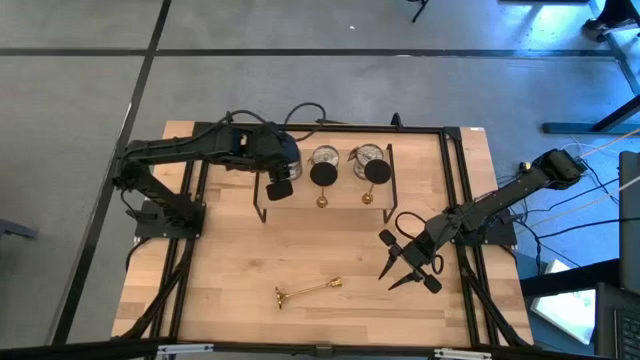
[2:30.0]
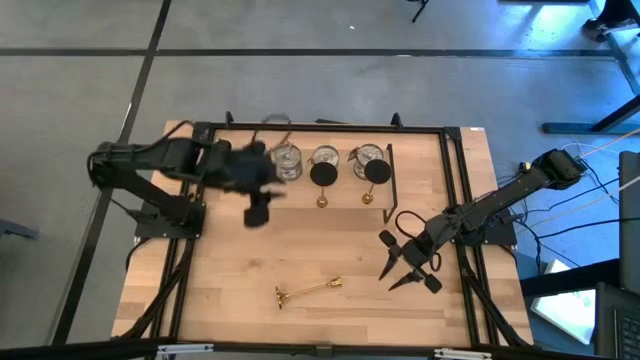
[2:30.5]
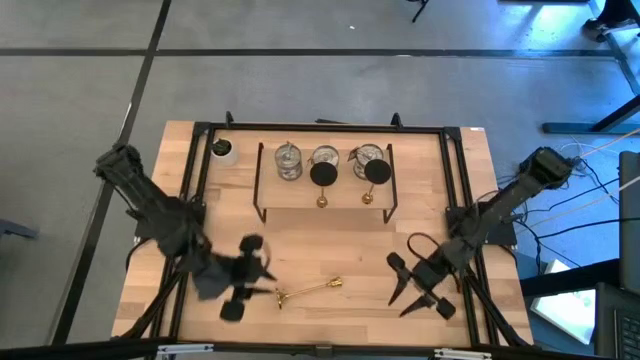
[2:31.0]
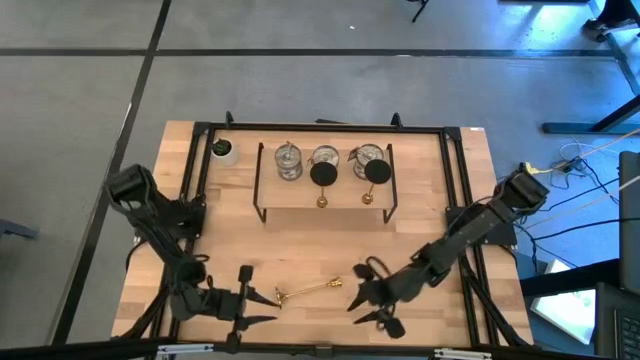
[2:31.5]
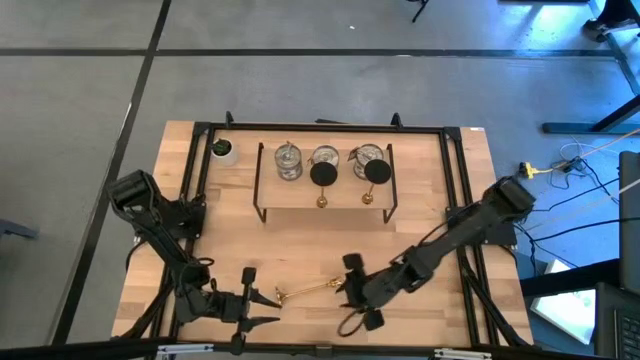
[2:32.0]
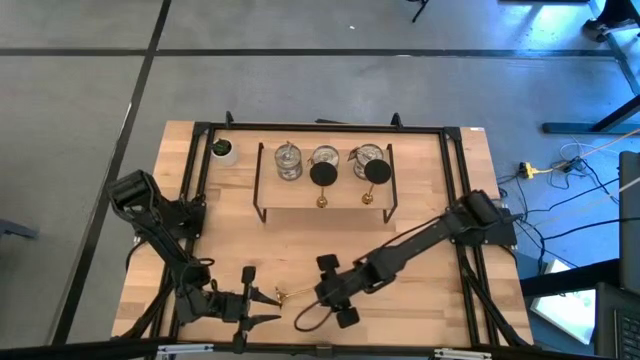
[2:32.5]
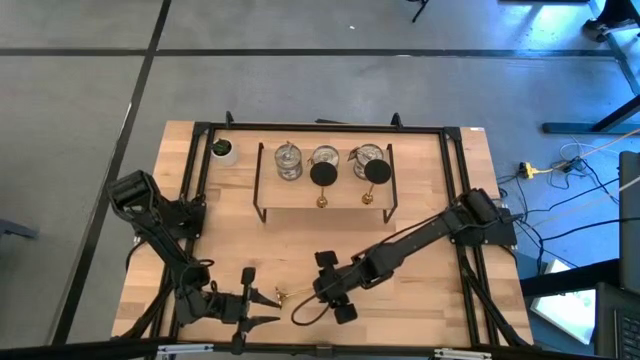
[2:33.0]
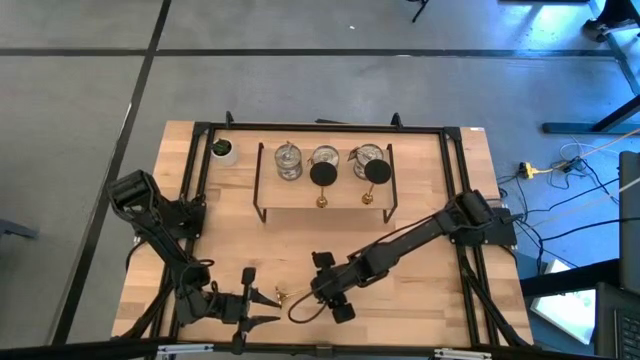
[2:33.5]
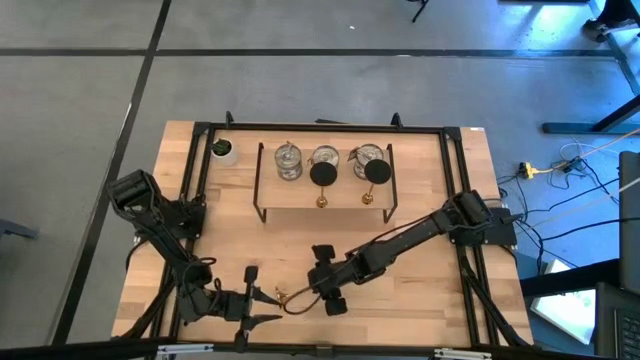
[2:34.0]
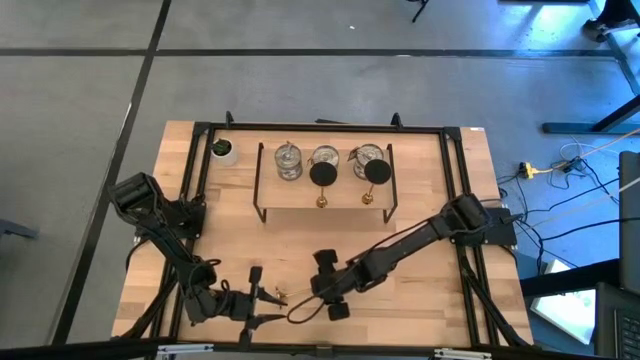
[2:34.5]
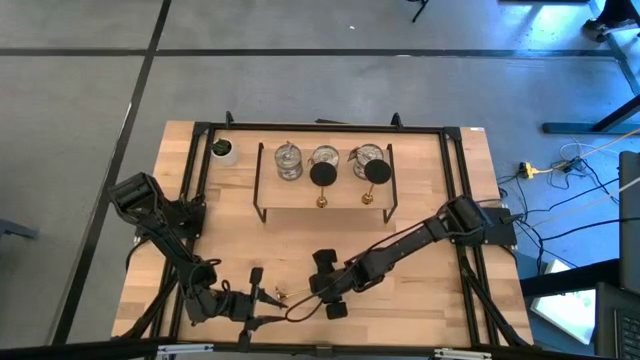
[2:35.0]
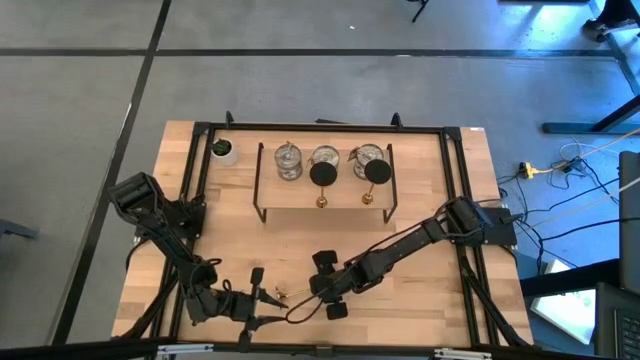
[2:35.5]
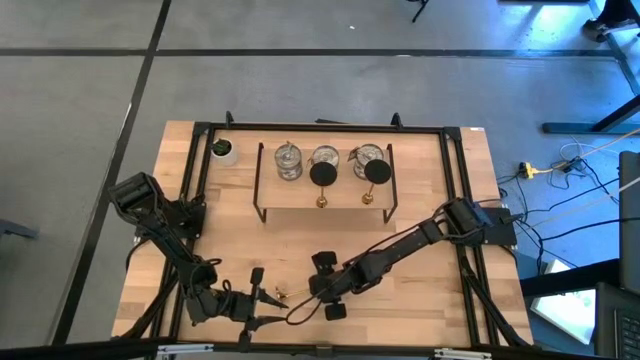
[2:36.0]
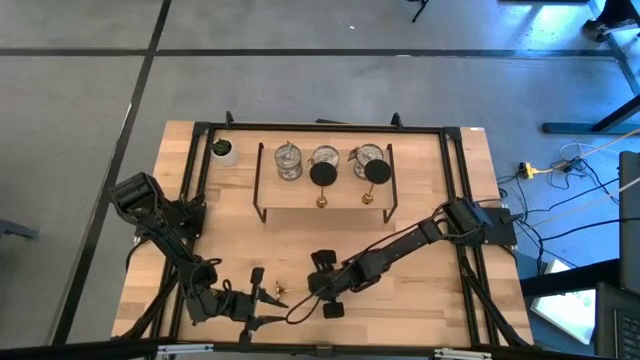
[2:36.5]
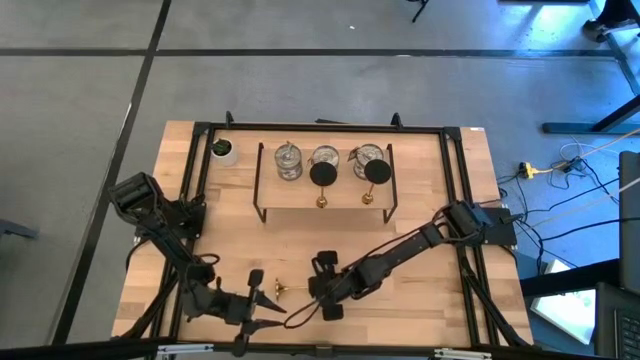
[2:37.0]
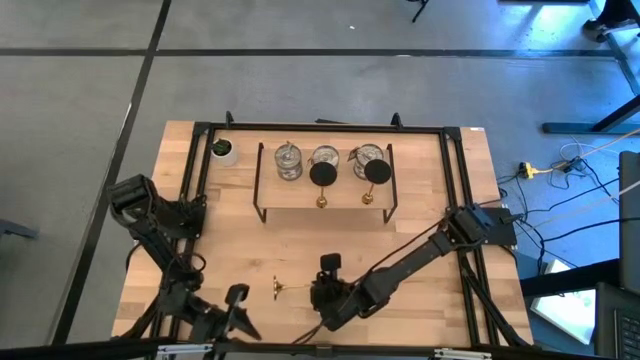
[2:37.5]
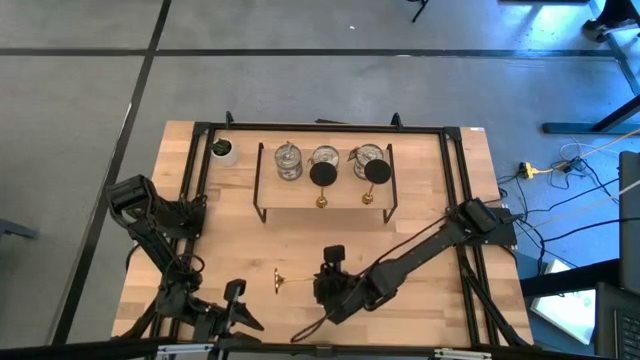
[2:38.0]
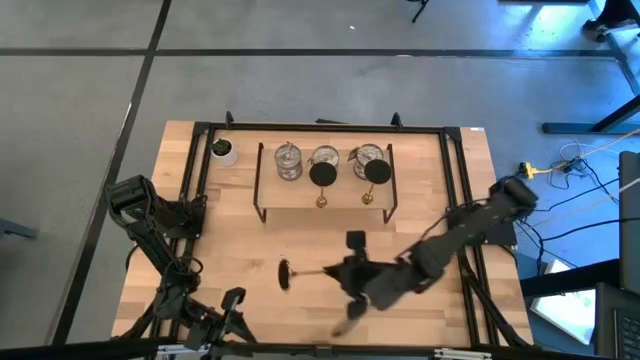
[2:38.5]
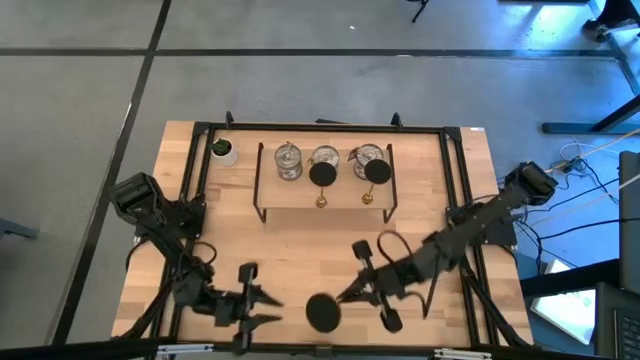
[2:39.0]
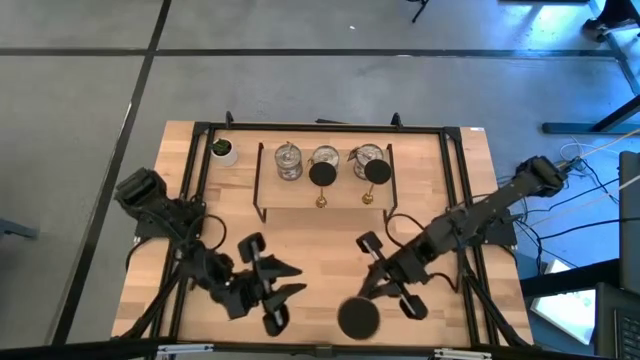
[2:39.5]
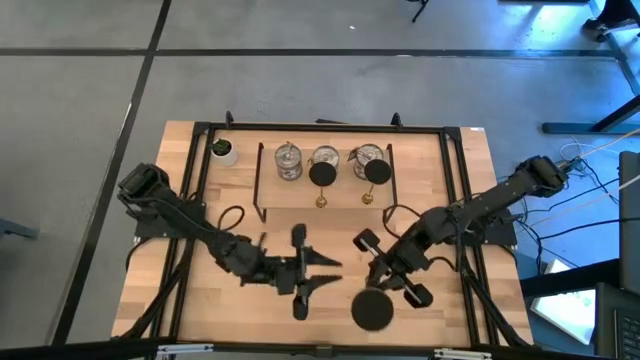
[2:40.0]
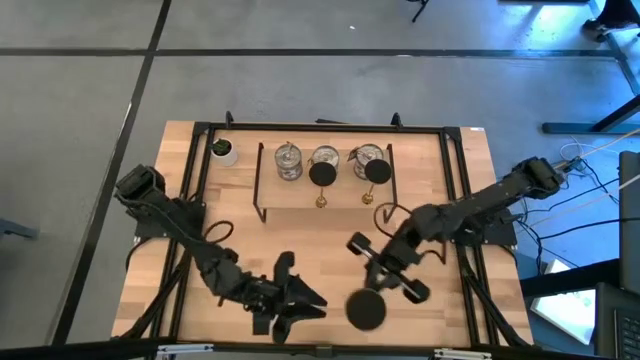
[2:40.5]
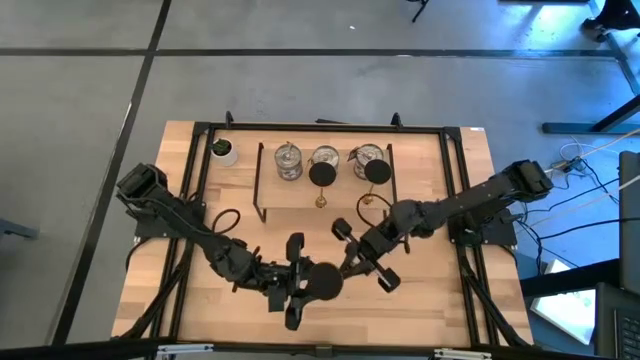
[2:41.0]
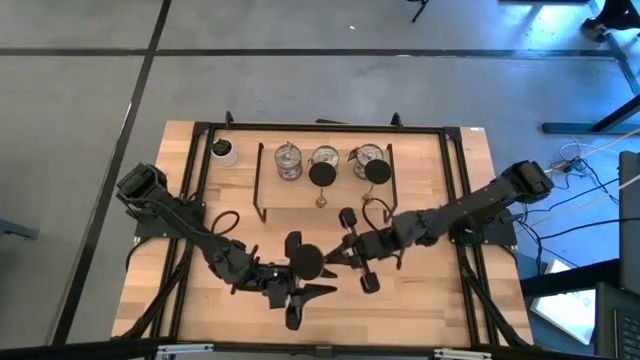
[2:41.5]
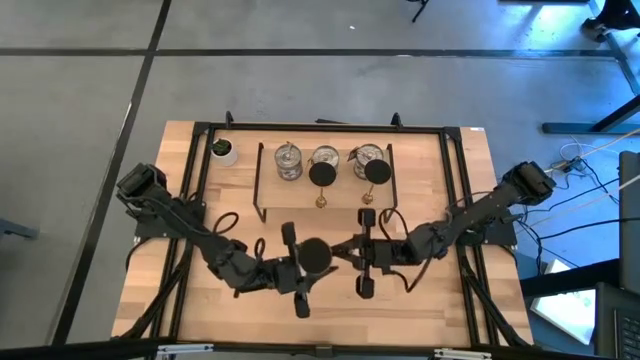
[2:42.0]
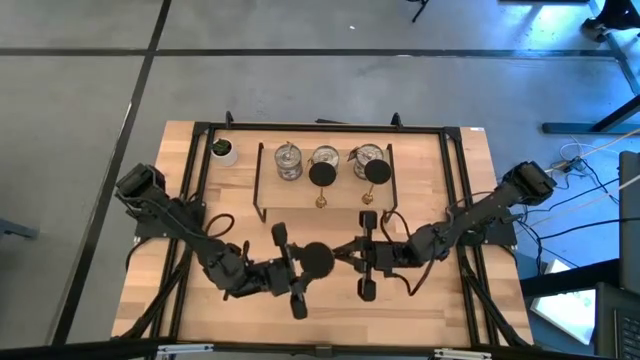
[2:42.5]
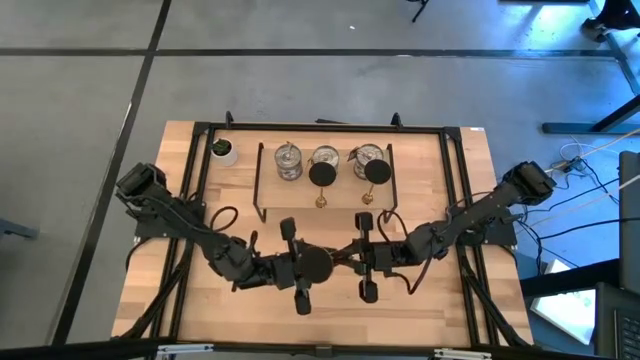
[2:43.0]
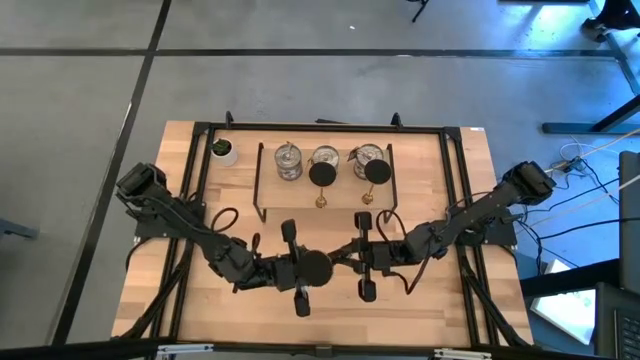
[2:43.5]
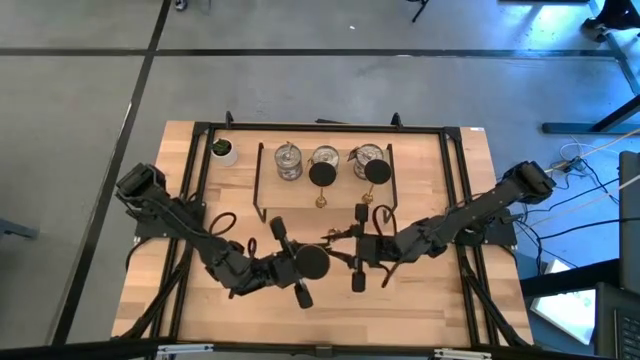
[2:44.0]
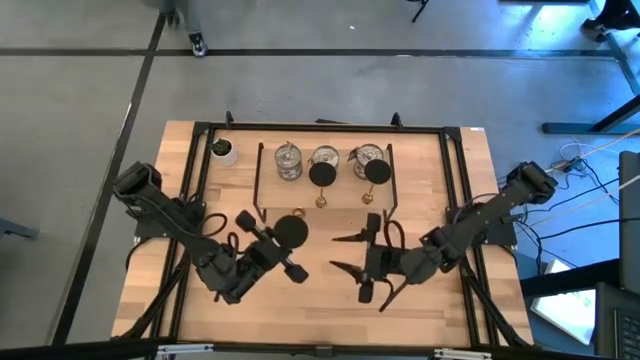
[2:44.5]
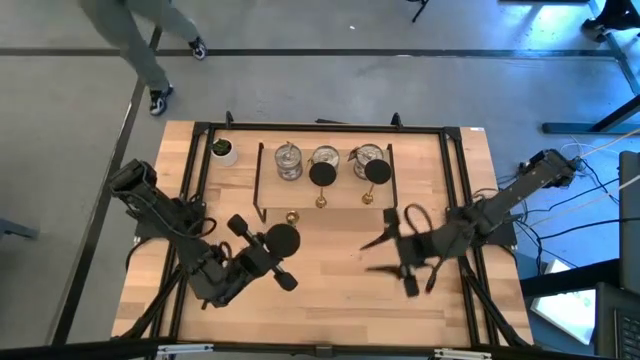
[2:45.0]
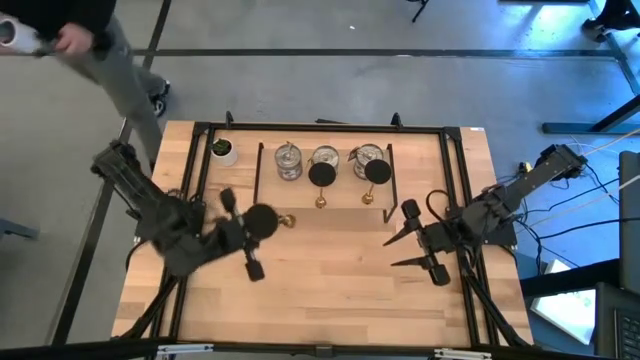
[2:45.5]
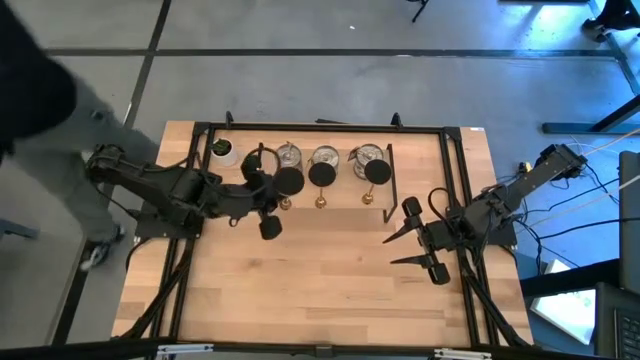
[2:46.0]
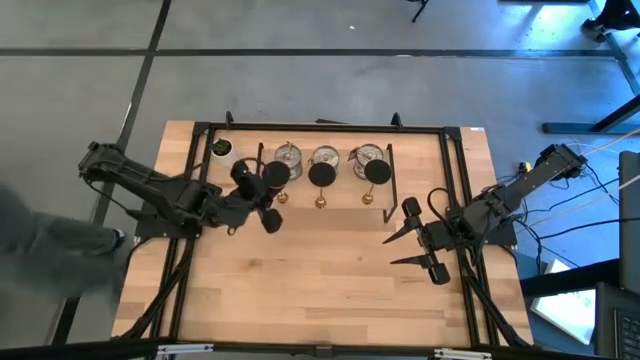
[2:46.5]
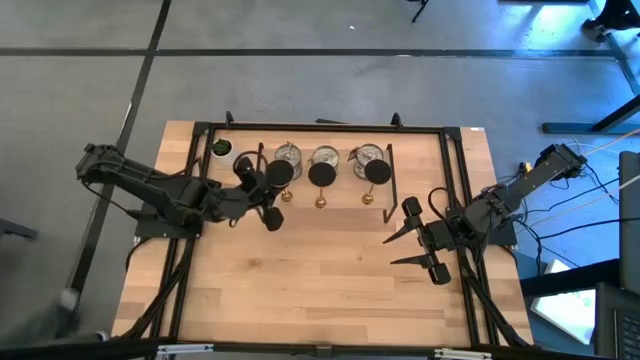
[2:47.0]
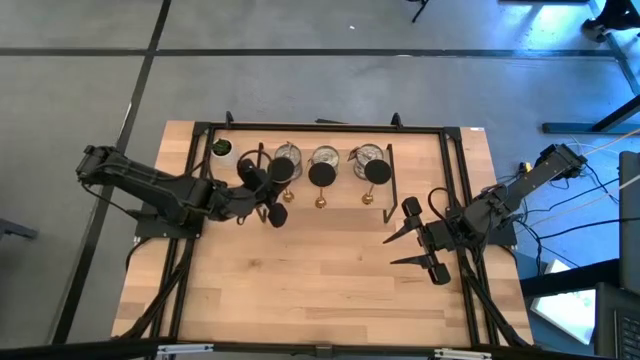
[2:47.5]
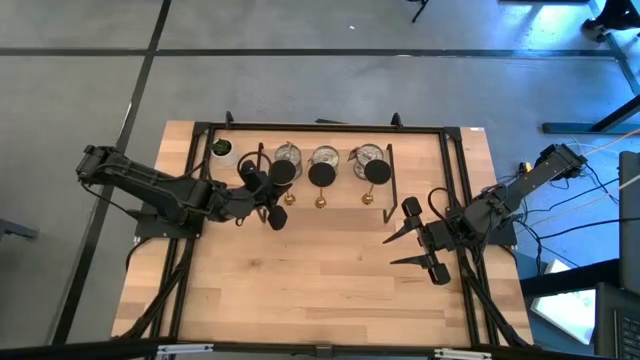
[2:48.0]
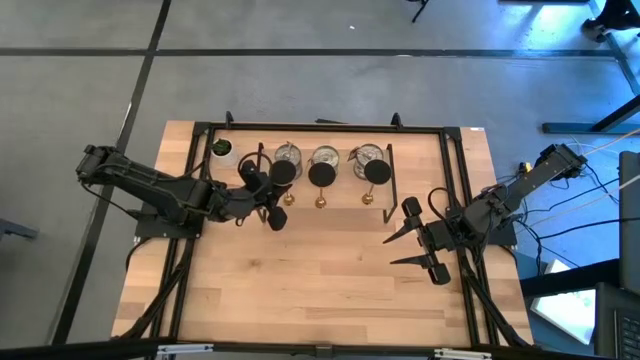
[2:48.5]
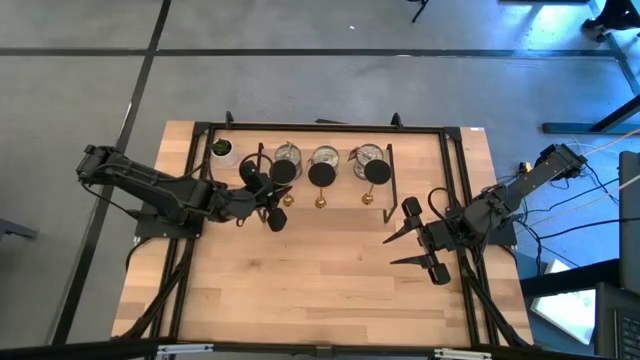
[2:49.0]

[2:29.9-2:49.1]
Task: Pick & Place candle stick holders
Put the gold candle holder on the shelf
